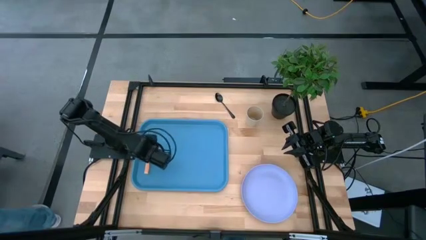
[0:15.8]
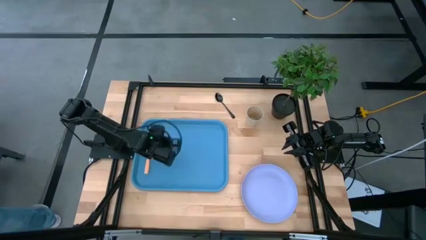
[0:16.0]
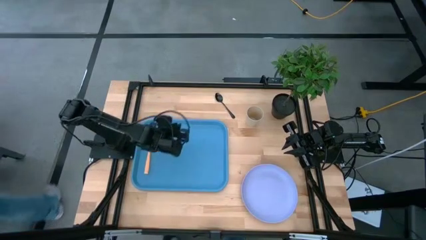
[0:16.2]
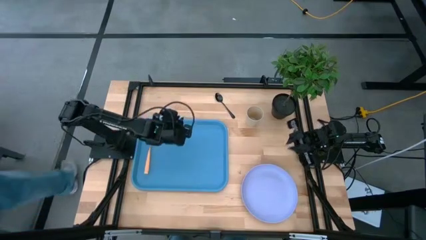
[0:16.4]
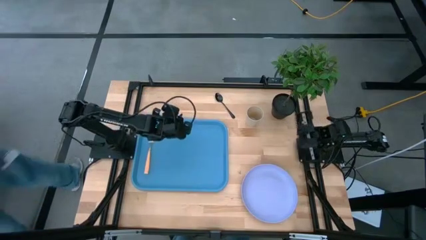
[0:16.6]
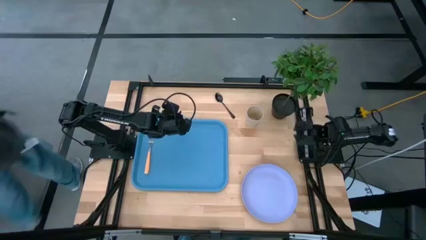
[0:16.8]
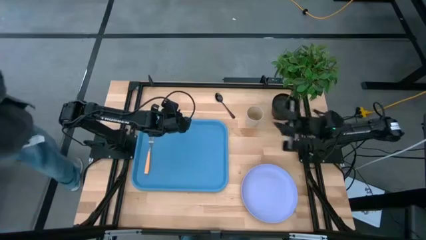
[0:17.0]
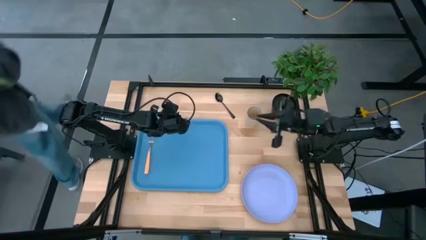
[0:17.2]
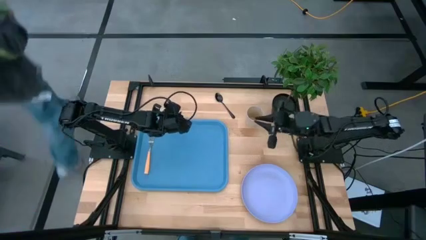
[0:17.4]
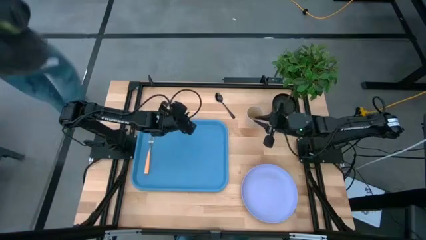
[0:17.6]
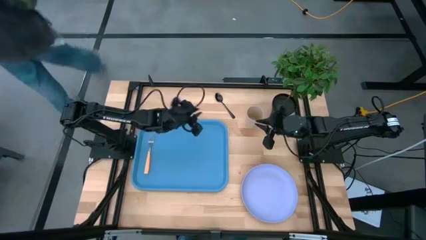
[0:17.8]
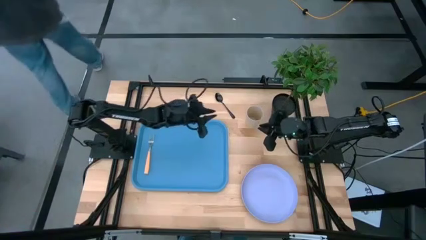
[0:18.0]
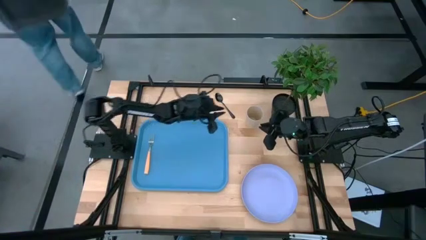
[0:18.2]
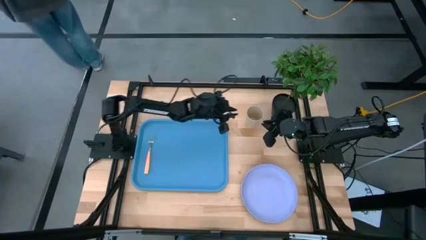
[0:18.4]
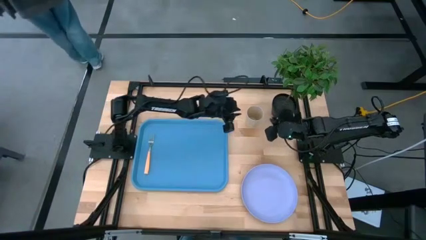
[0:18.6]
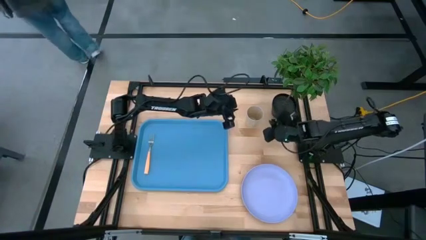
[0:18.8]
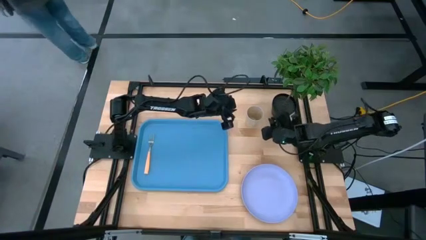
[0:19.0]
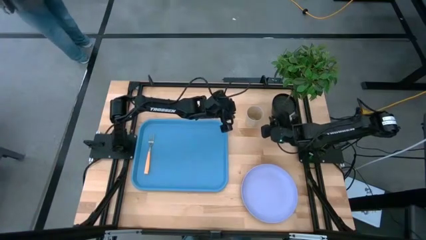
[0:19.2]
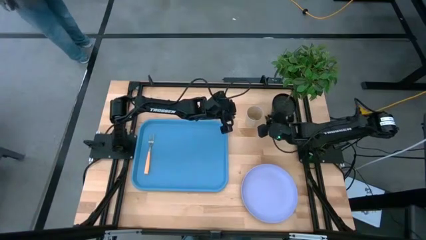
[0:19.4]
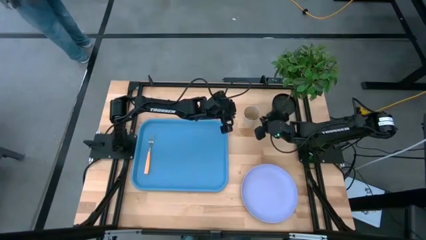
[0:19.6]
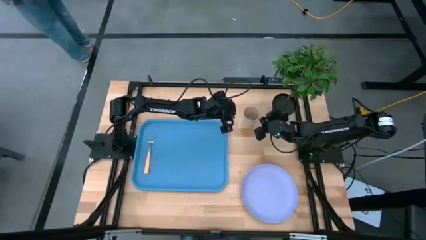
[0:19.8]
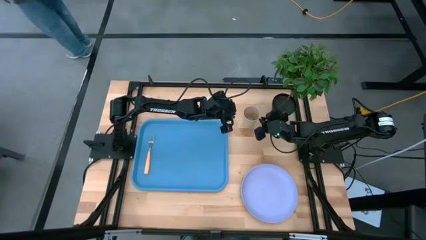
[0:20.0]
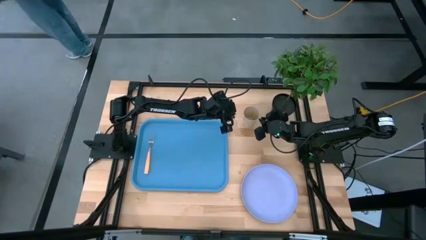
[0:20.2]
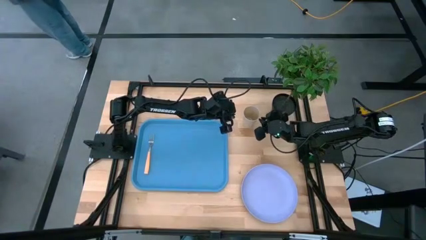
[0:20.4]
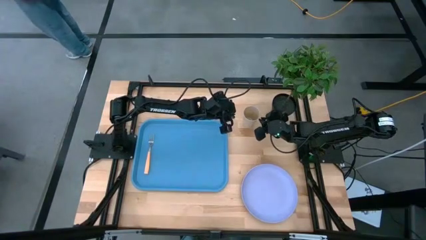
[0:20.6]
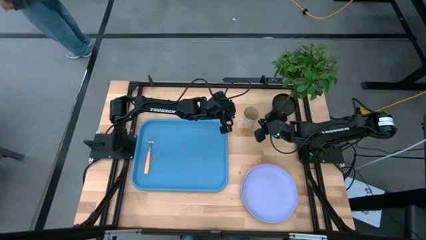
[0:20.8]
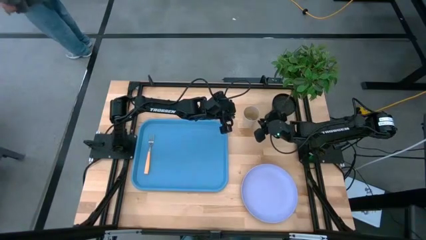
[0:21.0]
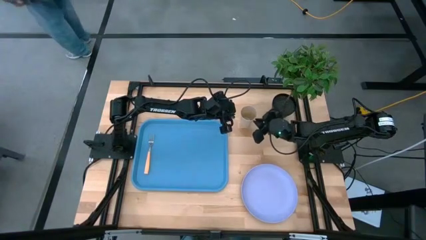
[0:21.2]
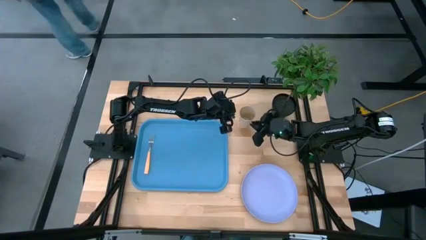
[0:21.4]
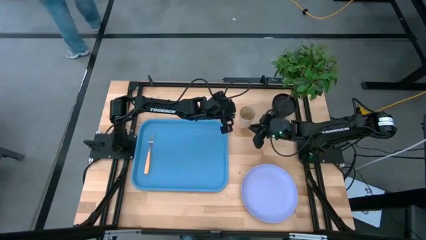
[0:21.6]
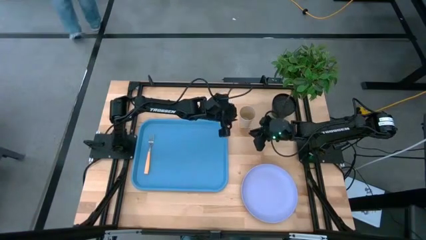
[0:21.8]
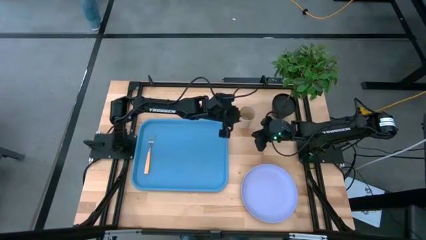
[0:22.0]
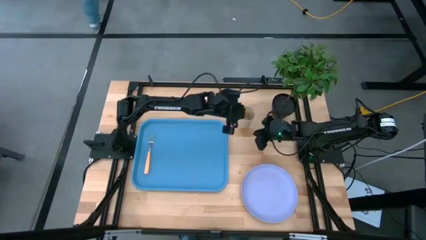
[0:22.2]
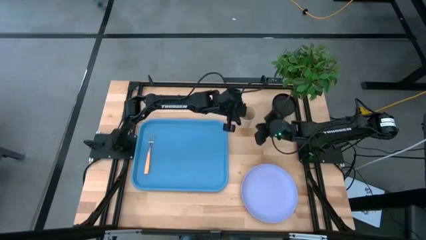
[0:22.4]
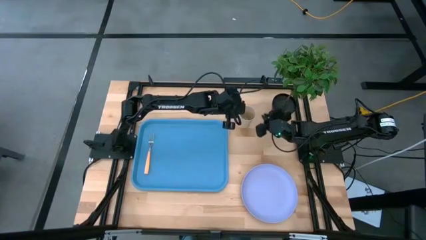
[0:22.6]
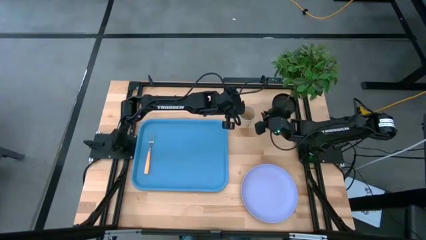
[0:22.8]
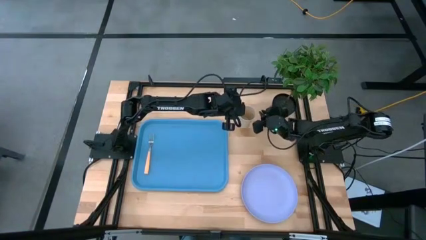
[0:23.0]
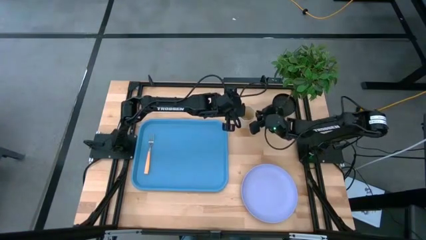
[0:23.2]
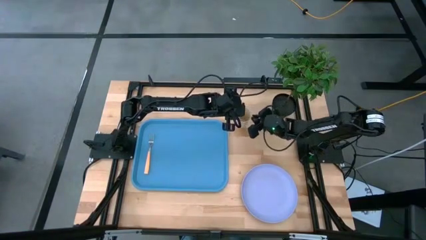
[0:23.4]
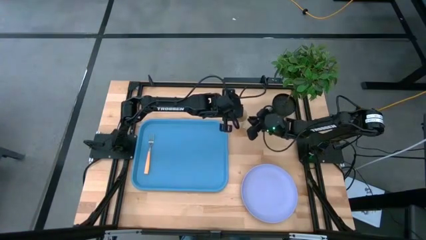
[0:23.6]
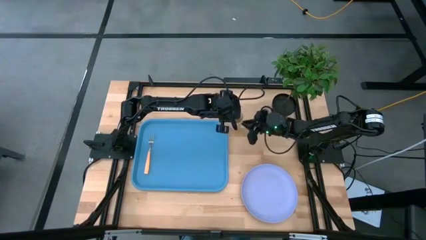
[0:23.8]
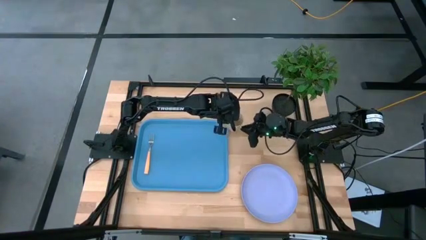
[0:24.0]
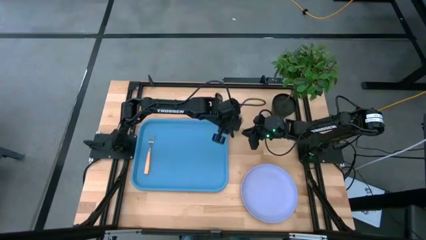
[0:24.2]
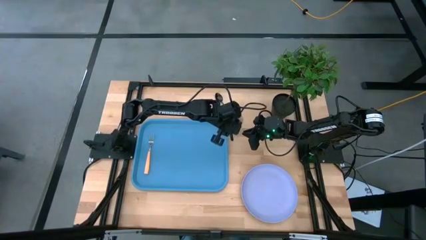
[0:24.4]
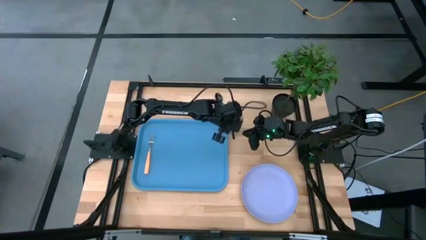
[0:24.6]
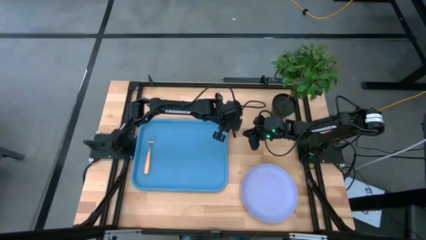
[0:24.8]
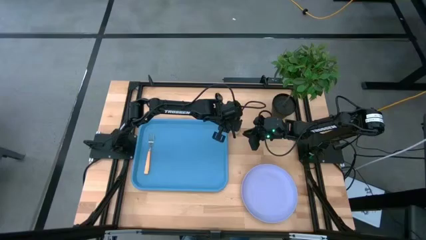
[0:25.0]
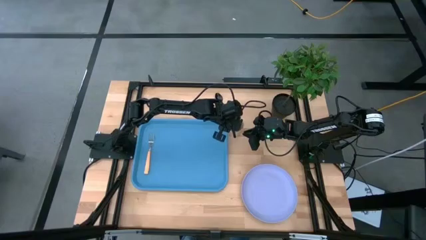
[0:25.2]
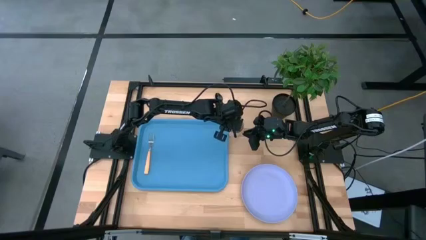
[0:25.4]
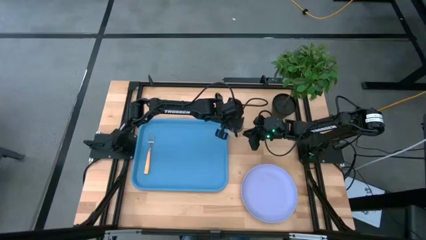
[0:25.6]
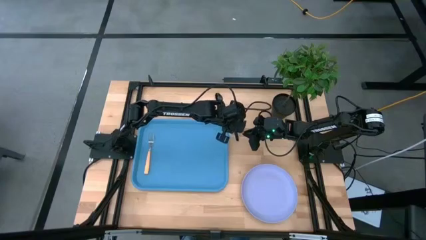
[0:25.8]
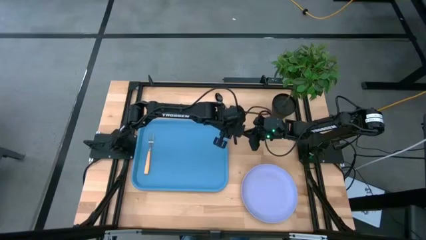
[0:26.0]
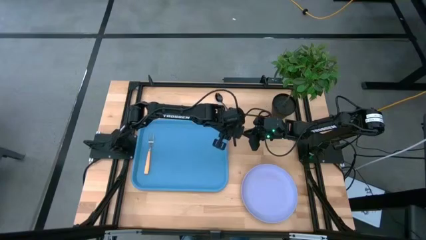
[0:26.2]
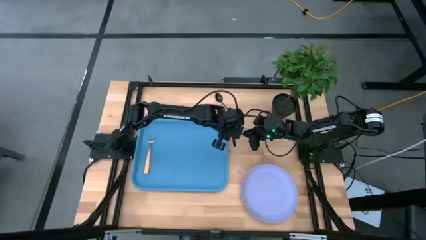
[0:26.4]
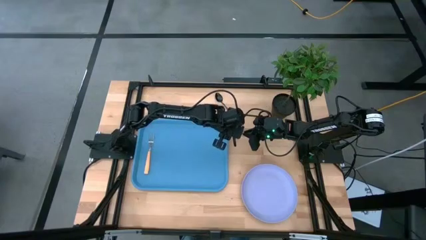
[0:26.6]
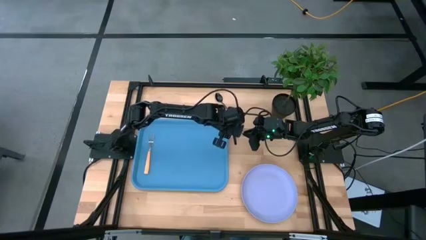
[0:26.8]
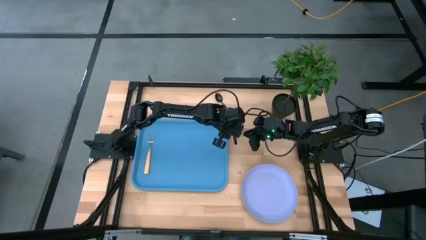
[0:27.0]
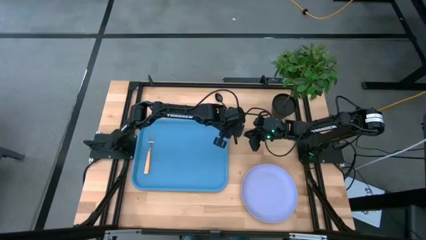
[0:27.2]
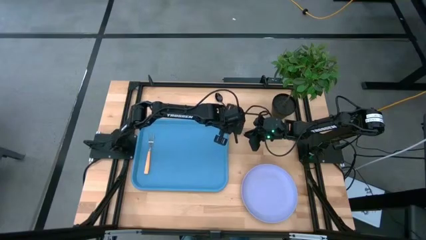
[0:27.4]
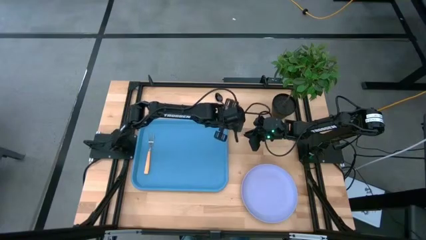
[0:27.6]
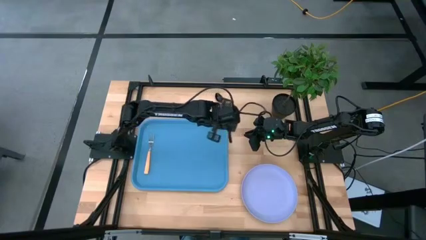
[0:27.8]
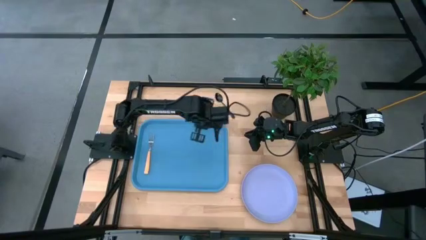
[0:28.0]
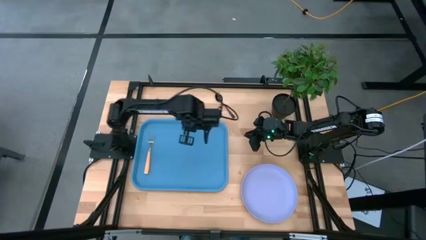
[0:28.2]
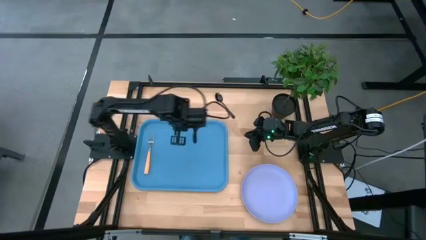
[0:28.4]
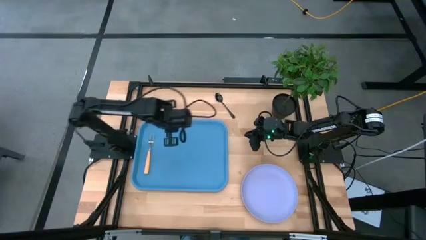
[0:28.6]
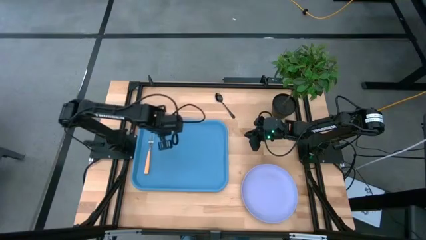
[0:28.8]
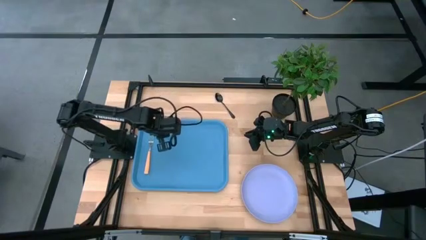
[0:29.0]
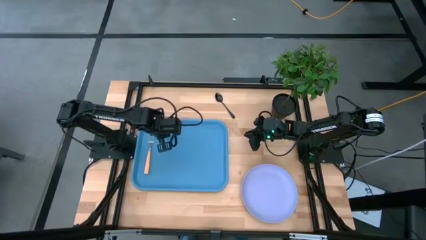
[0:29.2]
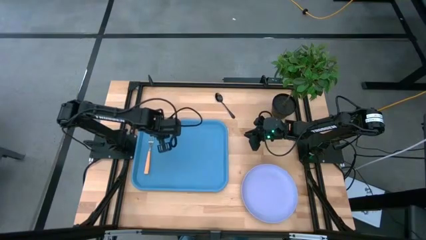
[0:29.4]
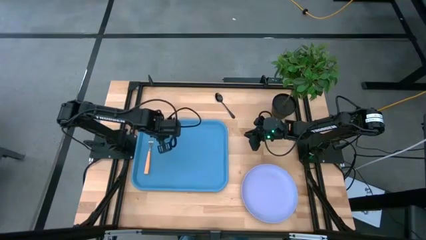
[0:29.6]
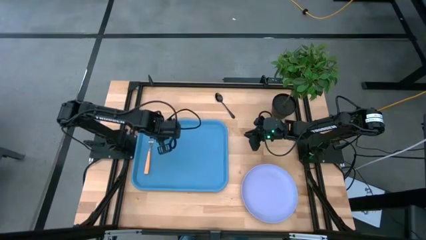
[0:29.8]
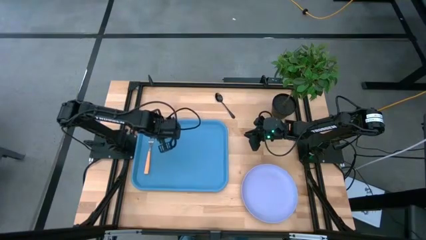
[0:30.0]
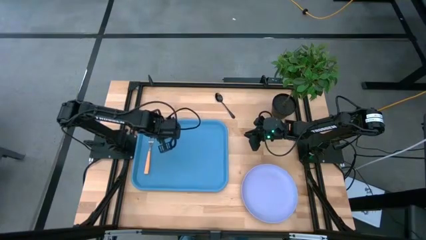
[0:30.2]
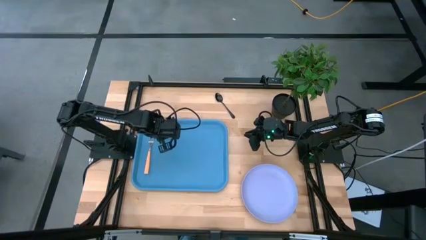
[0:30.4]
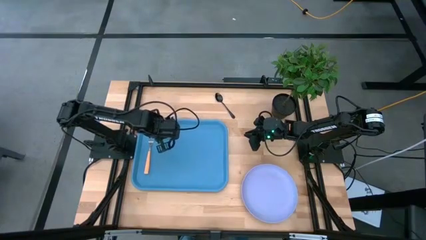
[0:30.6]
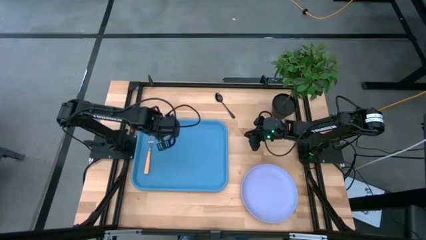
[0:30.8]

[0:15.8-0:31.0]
Task: Pick and place plate/cup/fork/spoon on tray
Put the light brown cup on the blue tray
